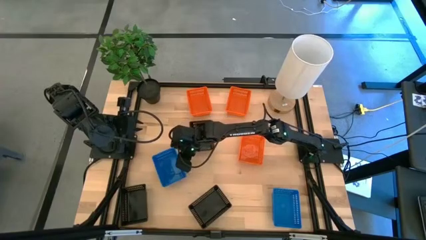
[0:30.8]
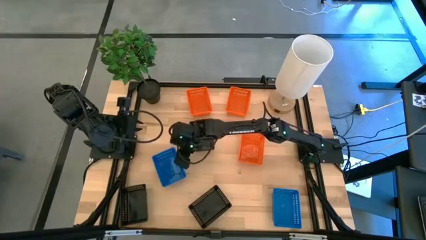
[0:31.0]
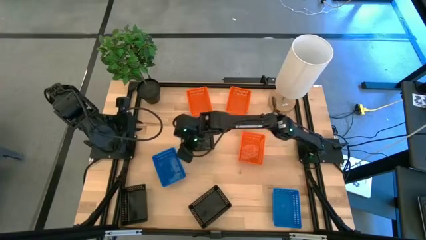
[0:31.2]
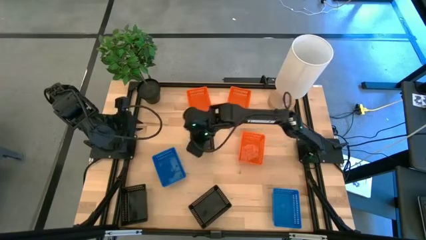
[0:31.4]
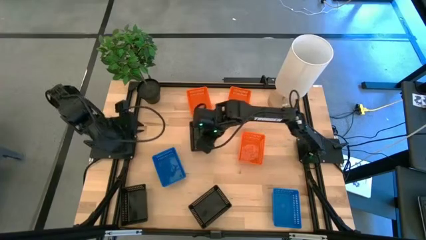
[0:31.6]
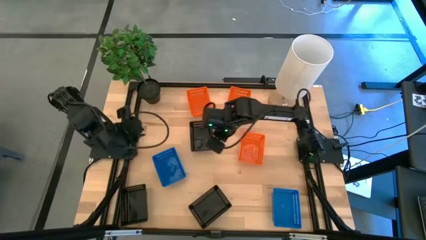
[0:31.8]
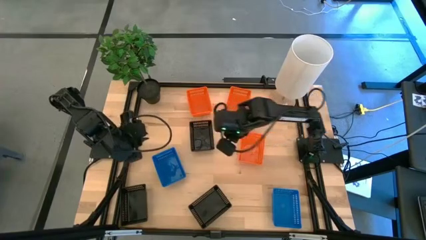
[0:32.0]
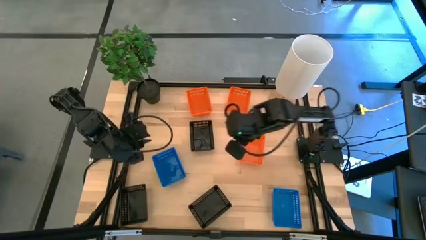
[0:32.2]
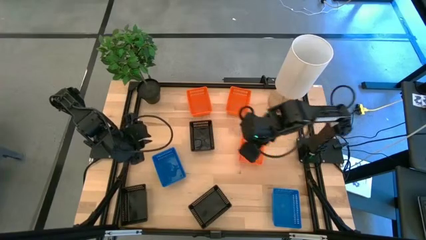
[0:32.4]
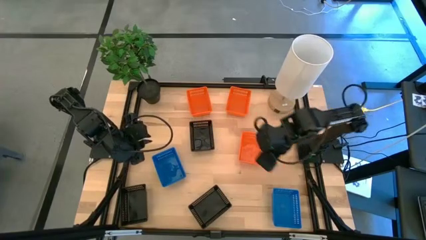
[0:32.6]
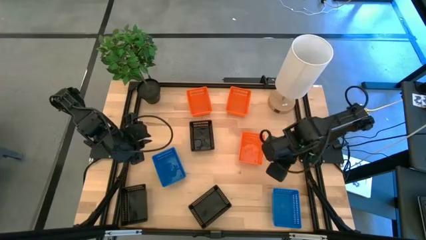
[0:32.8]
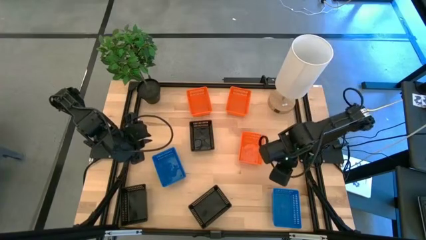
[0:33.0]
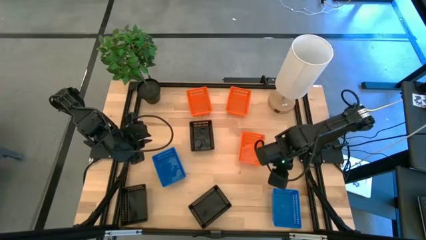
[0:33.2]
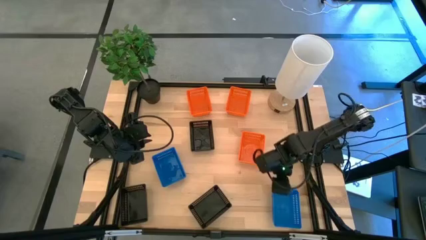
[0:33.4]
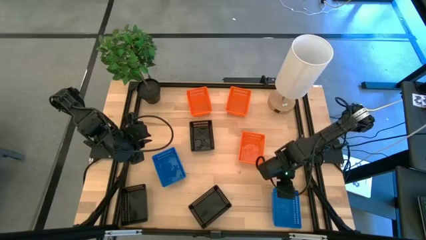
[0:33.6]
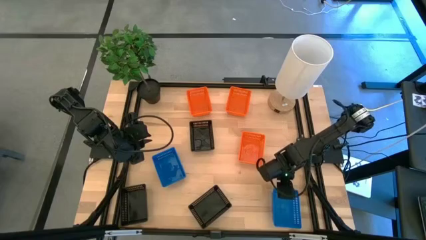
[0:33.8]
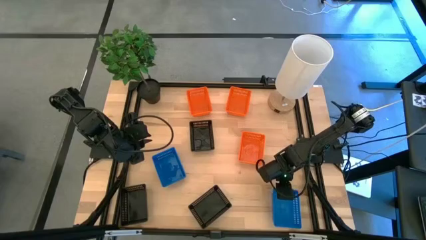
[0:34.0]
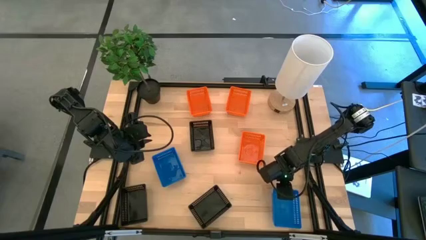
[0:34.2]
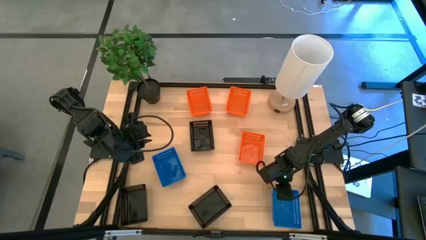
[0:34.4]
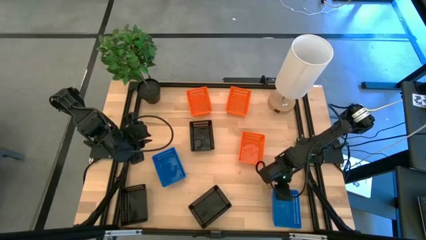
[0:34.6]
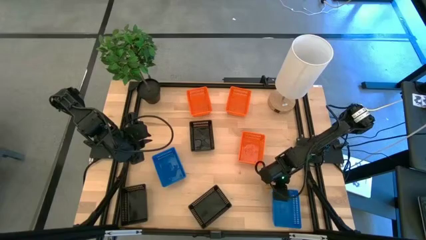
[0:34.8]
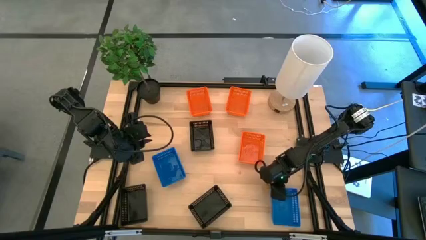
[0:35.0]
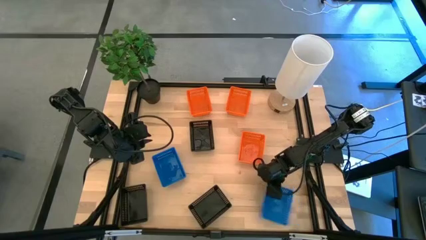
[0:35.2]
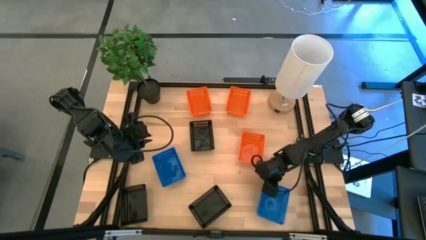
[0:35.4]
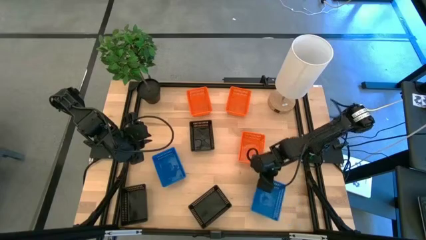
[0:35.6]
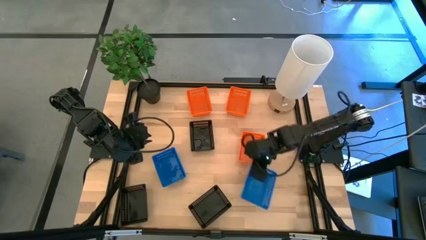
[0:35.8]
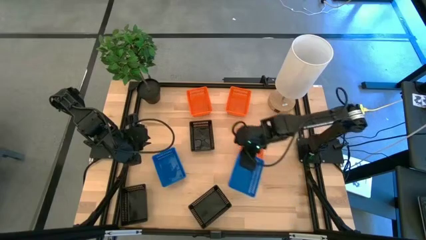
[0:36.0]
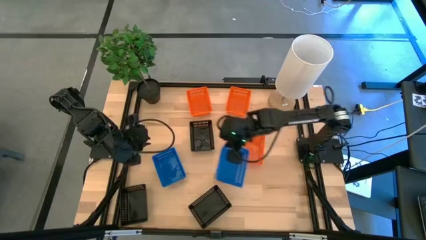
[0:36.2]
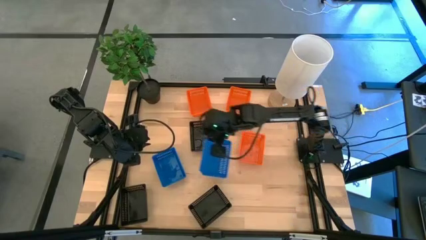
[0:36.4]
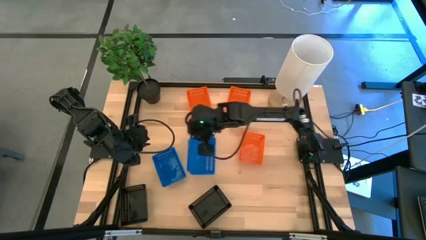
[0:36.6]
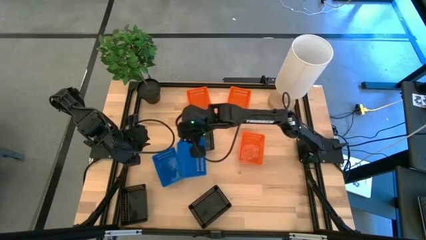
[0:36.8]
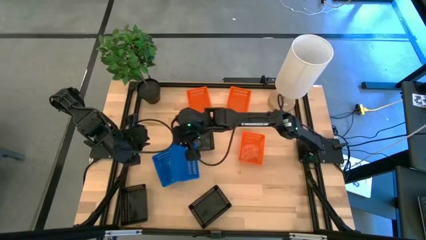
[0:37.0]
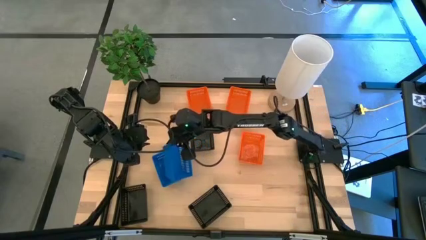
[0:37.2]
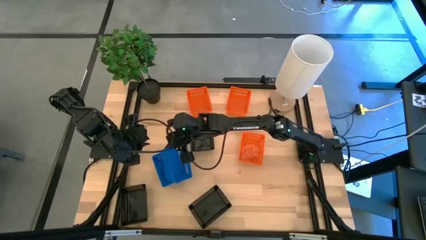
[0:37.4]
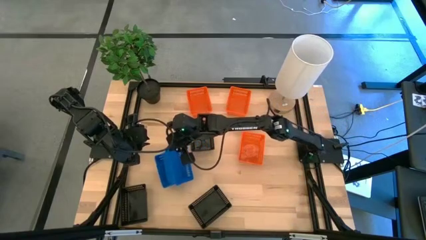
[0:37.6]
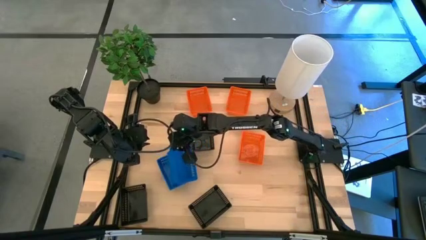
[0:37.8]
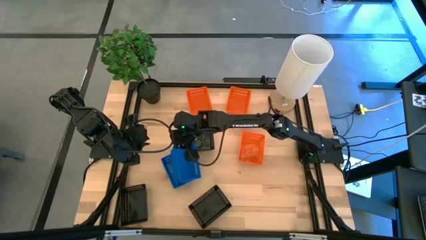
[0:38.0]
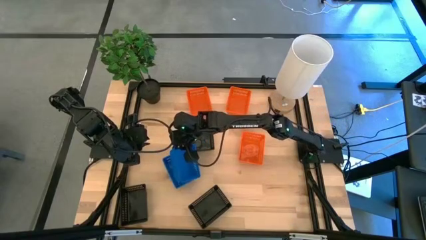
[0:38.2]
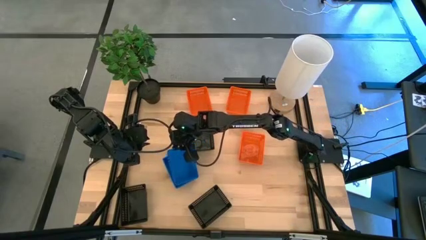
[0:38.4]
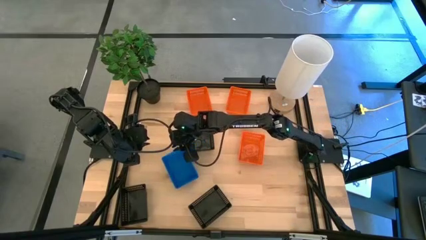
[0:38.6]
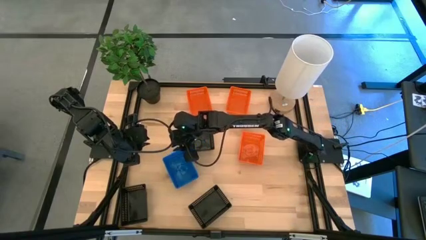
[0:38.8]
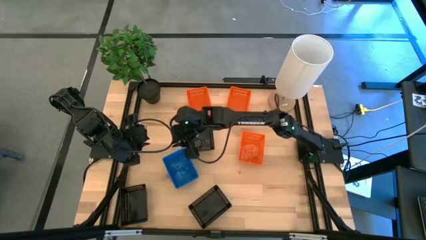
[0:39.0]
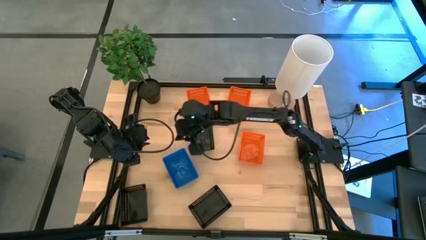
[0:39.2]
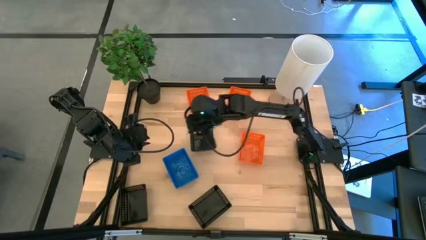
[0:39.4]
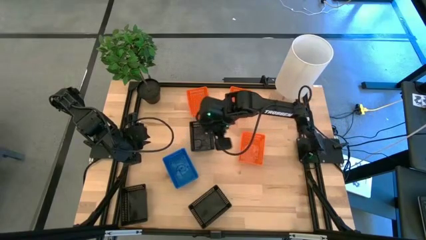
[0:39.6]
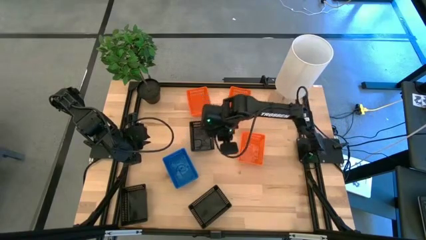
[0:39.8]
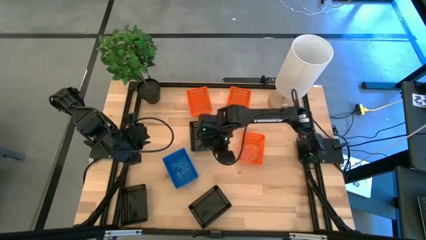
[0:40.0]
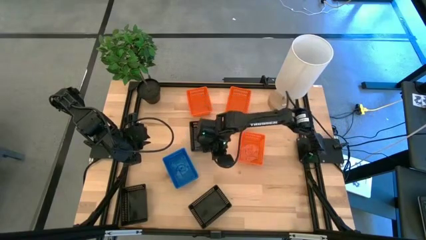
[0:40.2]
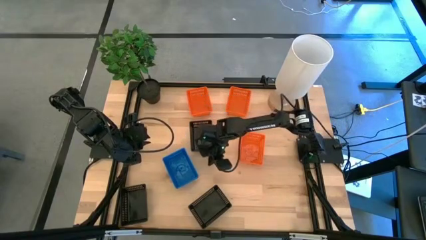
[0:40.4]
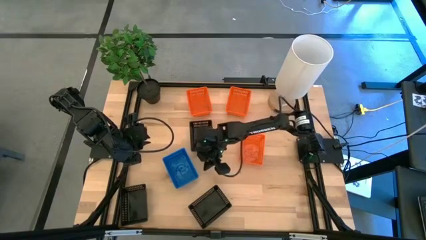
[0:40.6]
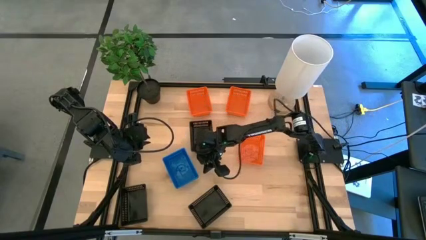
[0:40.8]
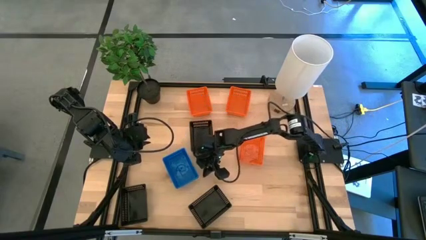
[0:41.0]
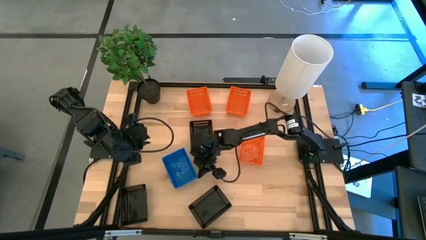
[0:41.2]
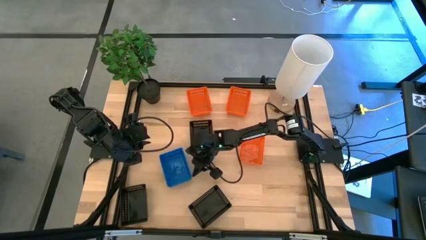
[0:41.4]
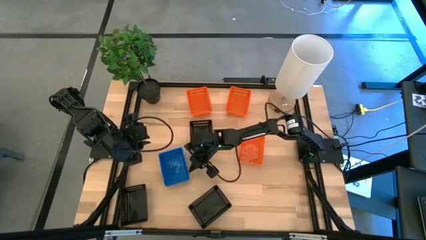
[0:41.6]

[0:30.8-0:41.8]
Stack the bottom blue bin on top of the top blue bin
